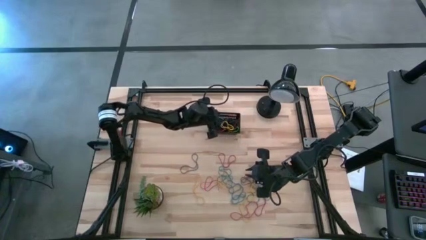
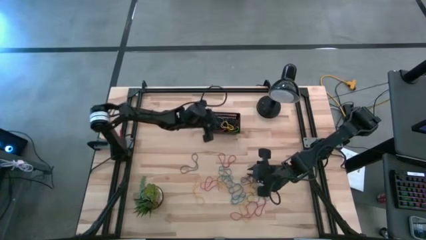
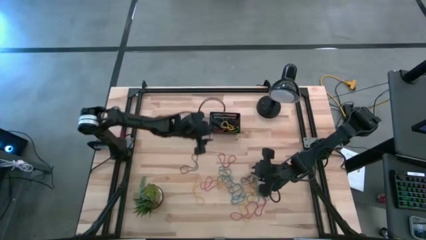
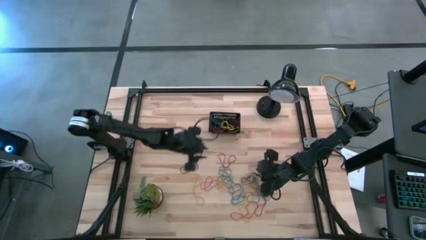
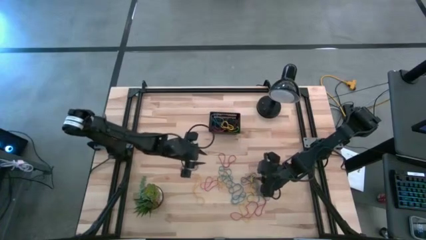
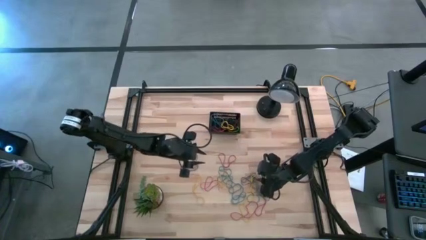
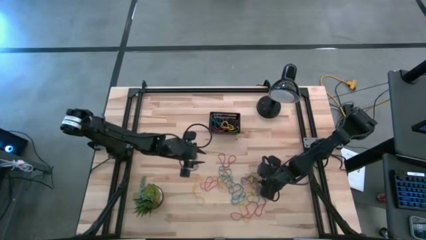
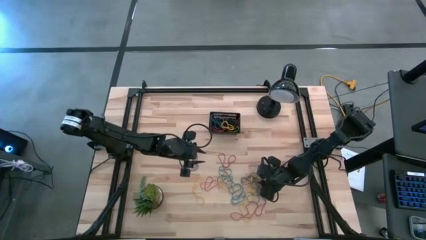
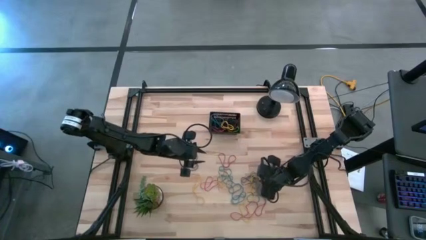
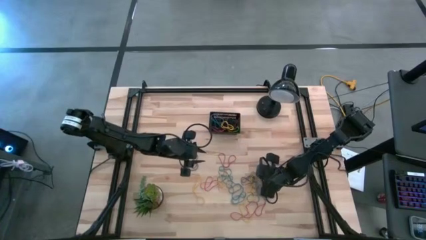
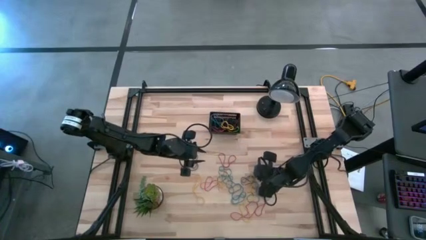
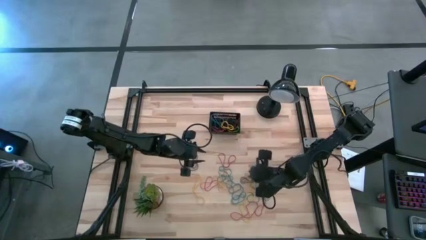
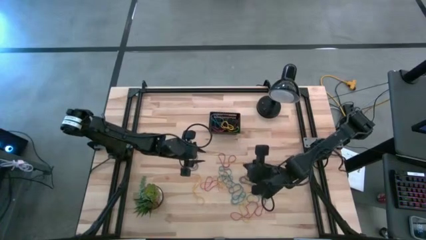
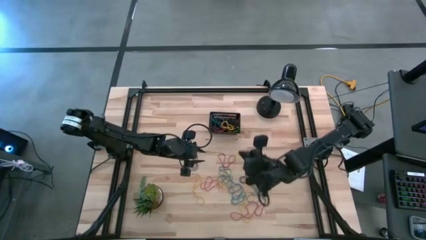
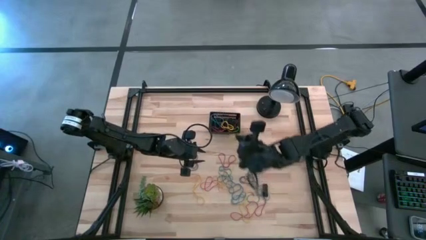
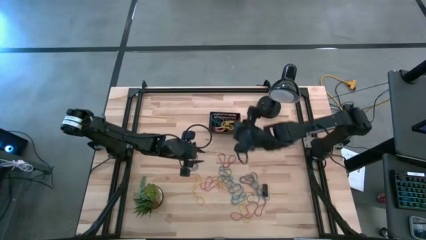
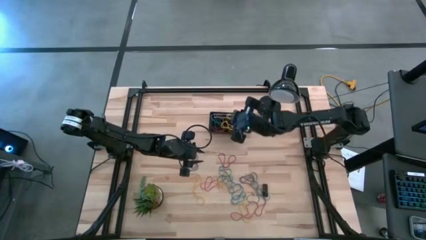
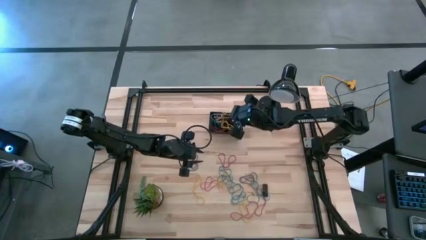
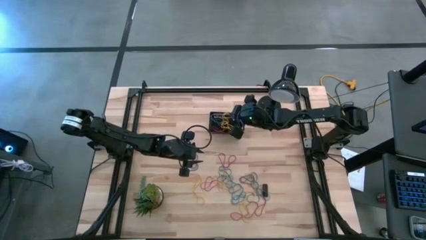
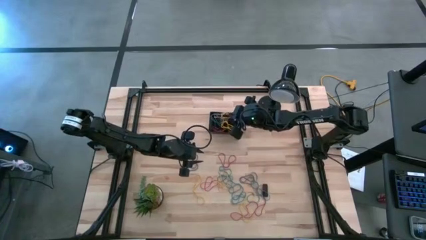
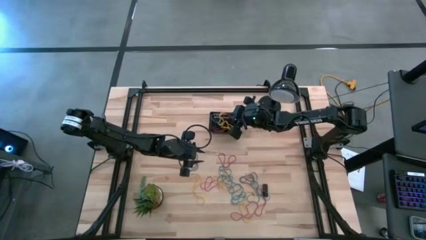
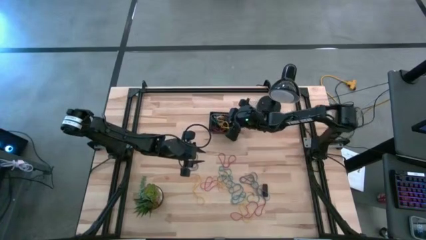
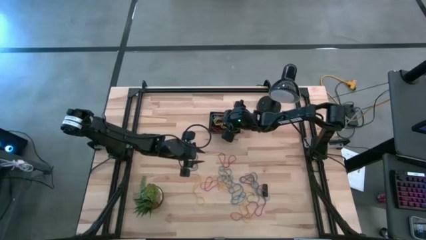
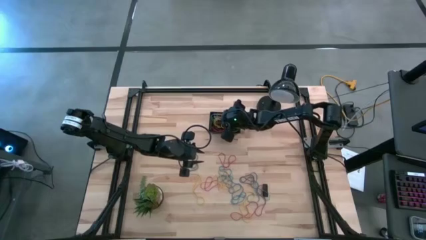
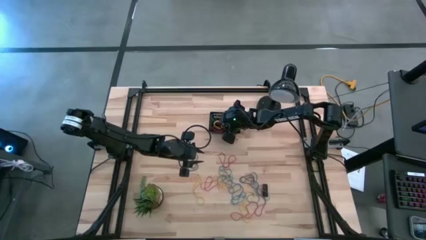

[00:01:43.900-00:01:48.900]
Task: Pick and place rubber bands into bin
Put the yellow rubber band into the basket

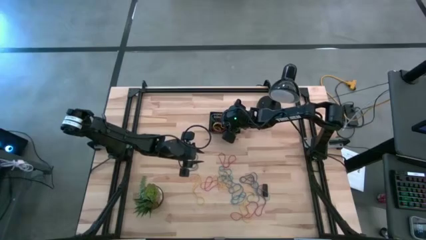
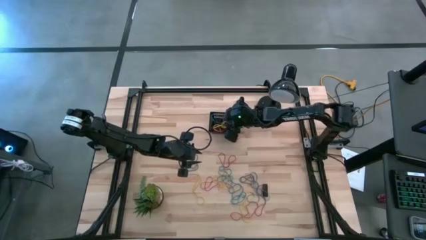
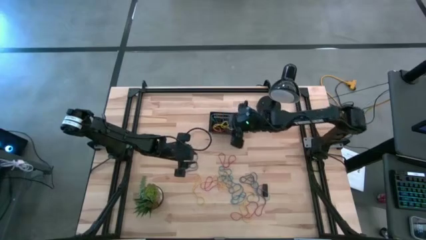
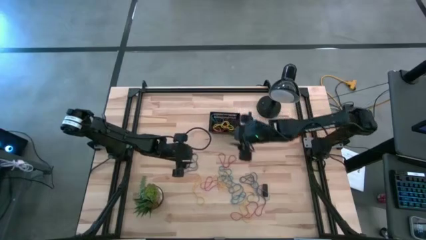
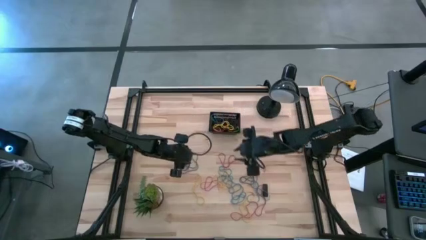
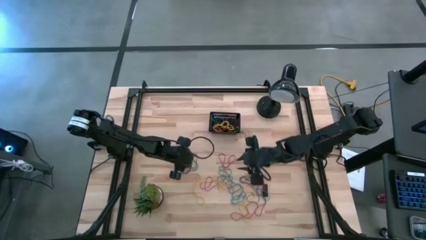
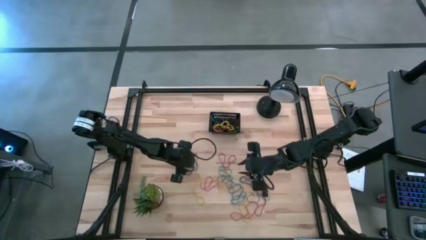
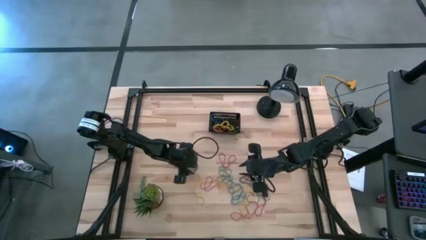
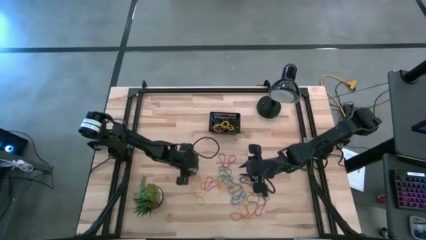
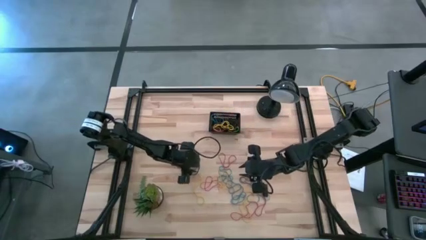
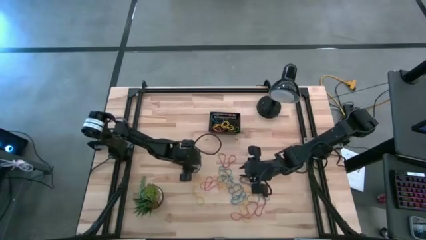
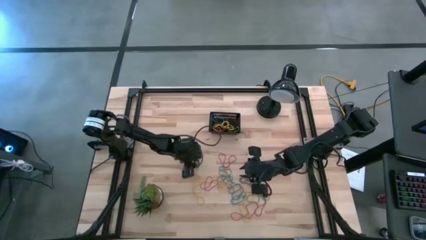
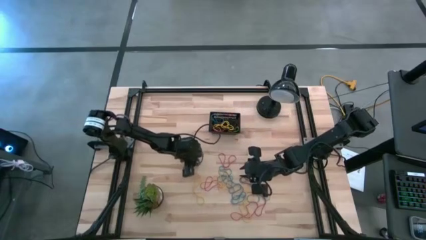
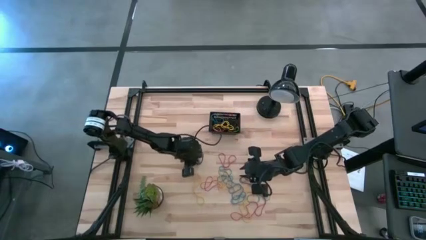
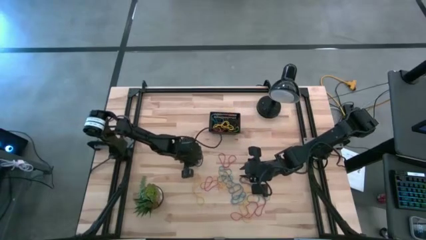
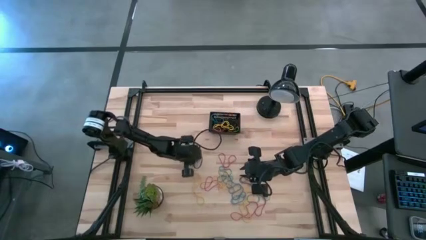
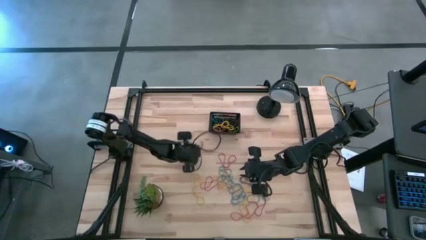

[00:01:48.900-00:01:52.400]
Put the purple rubber band into the basket

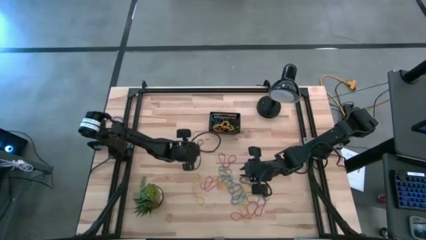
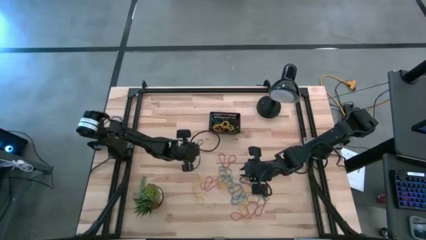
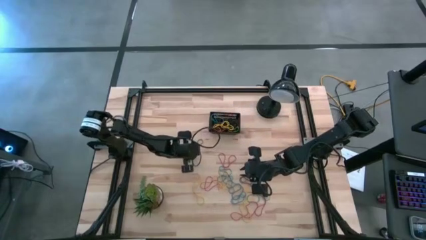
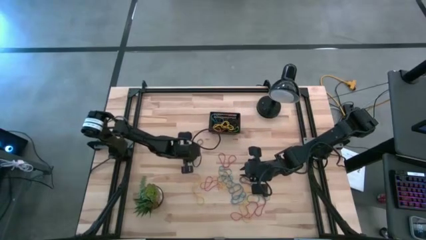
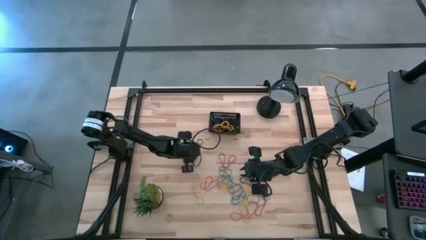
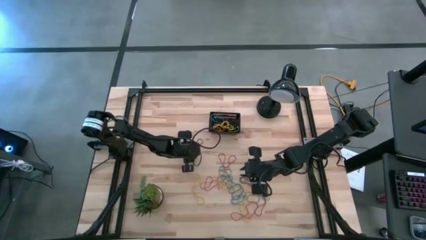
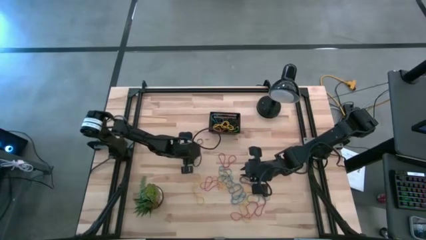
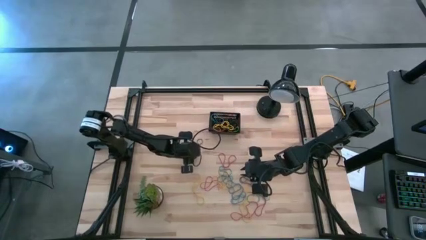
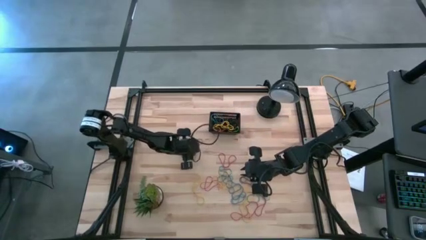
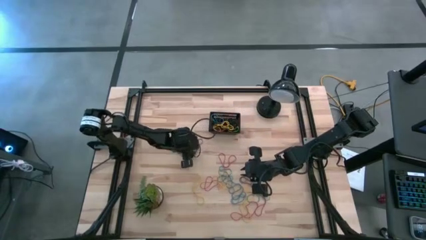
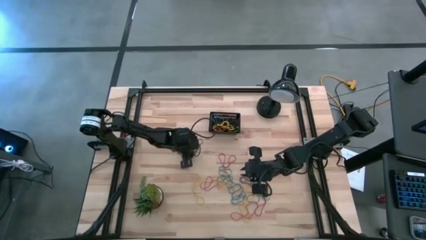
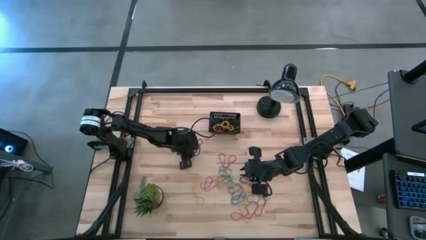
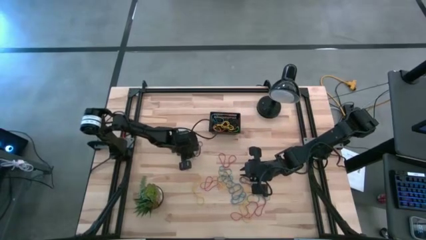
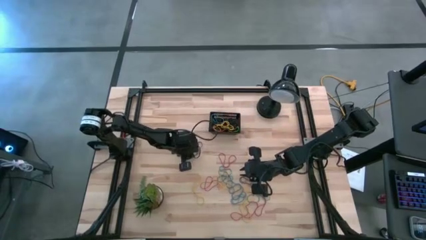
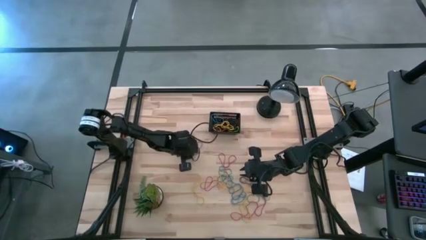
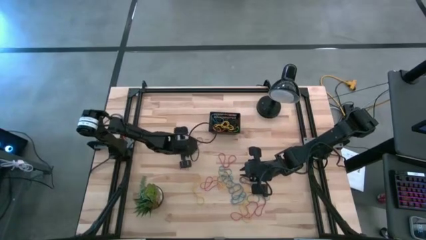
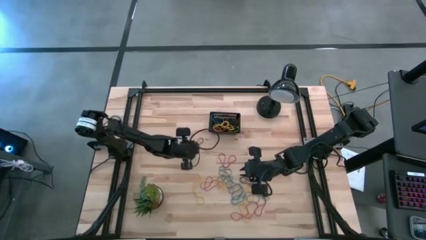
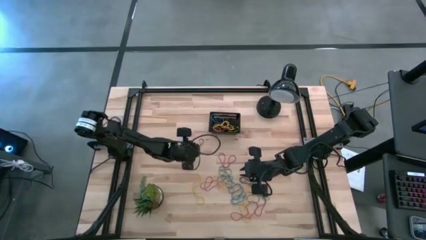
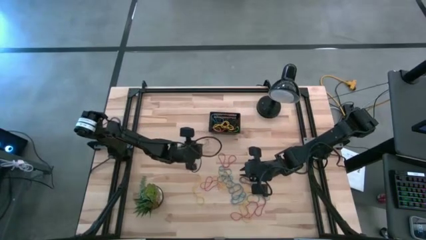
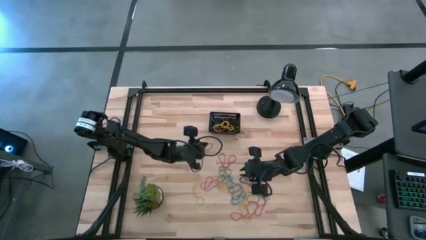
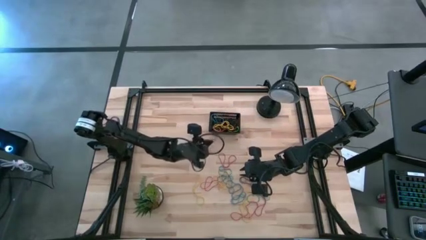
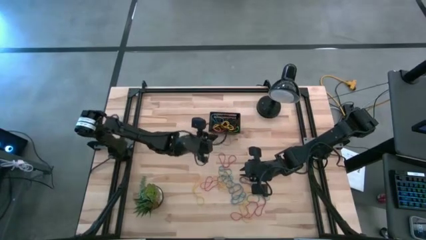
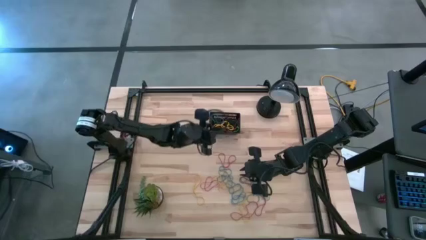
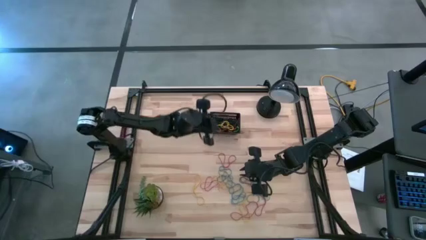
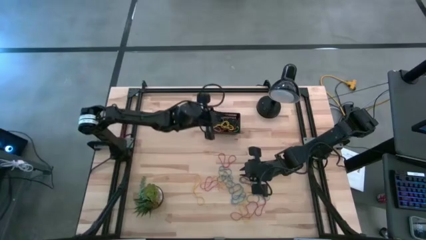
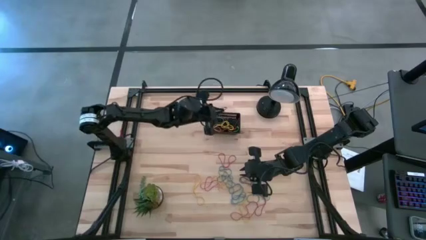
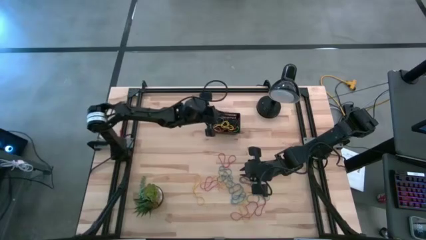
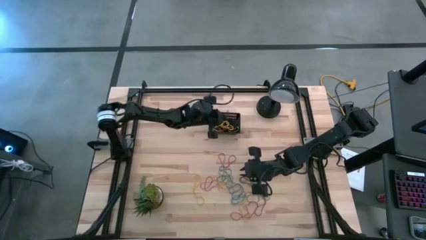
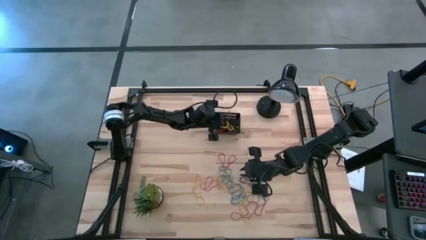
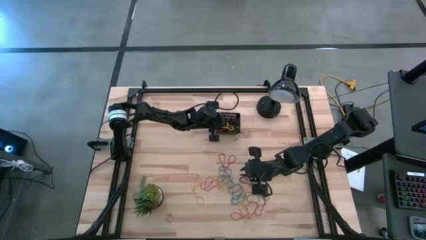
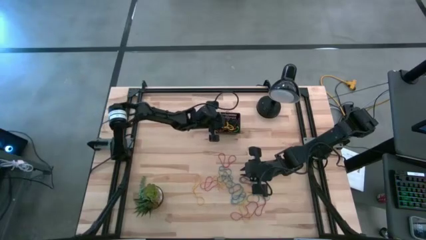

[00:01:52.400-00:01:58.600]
Put the purple rubber band into the basket
